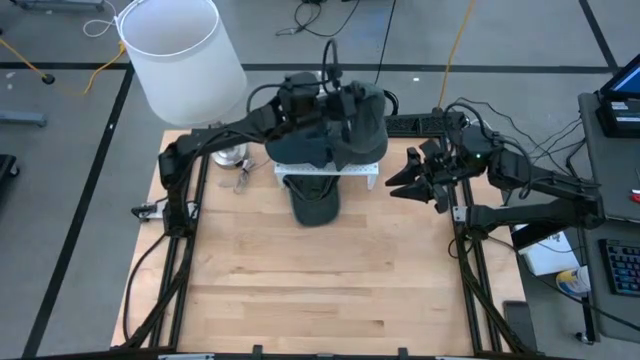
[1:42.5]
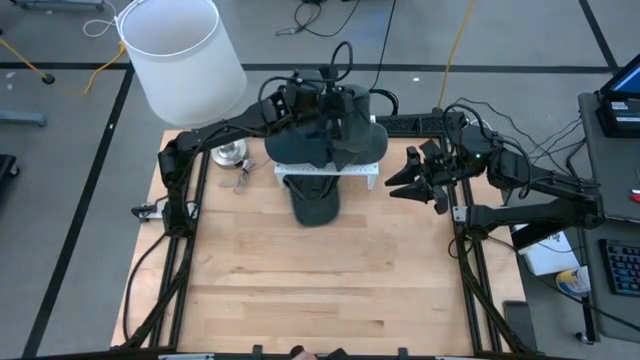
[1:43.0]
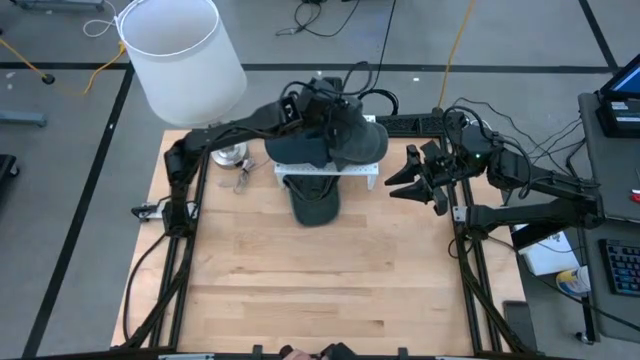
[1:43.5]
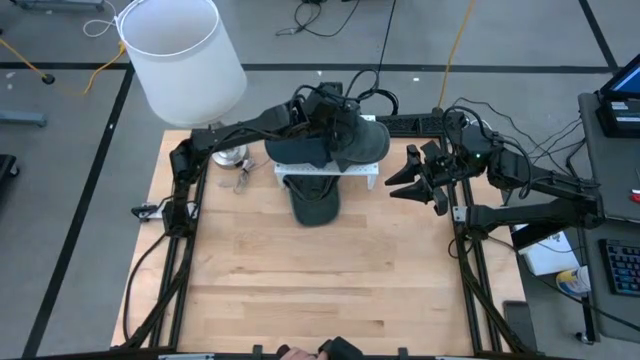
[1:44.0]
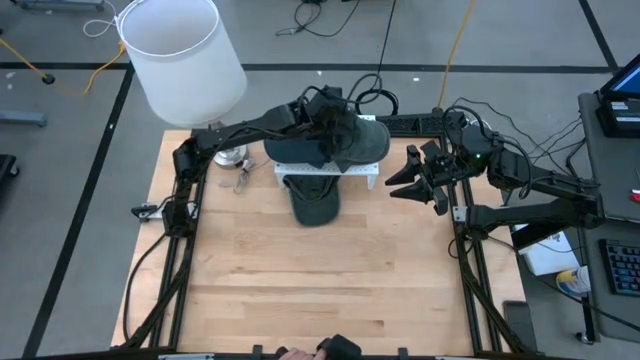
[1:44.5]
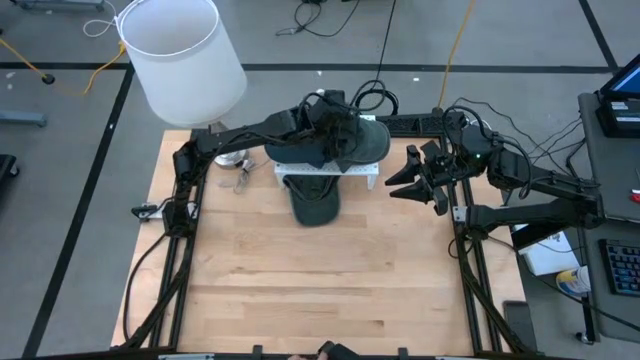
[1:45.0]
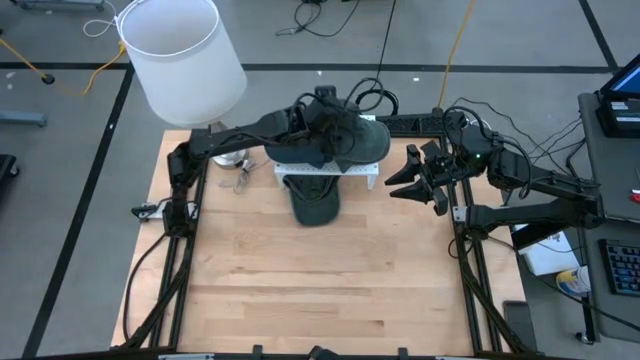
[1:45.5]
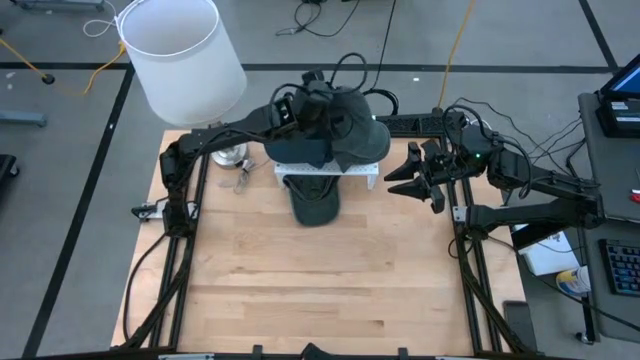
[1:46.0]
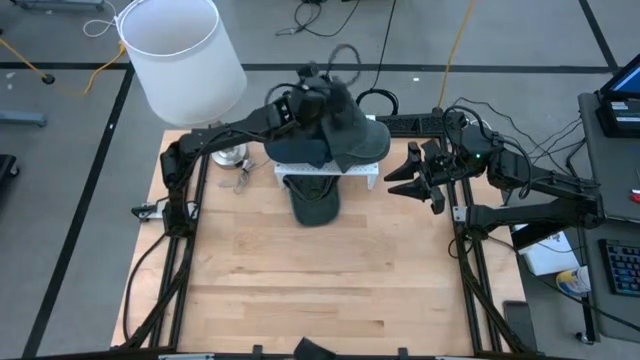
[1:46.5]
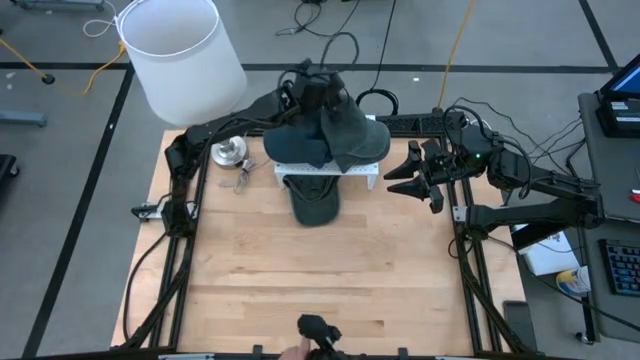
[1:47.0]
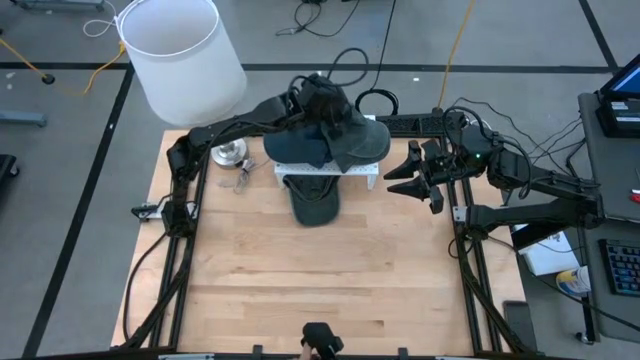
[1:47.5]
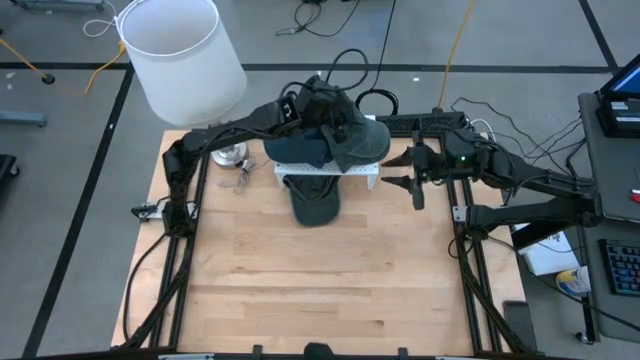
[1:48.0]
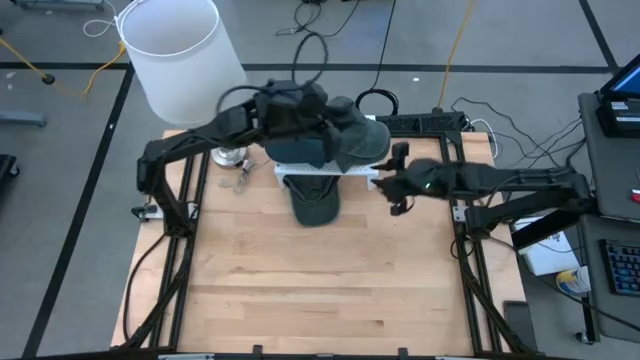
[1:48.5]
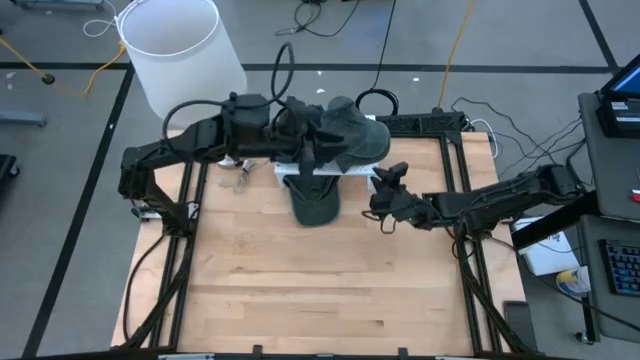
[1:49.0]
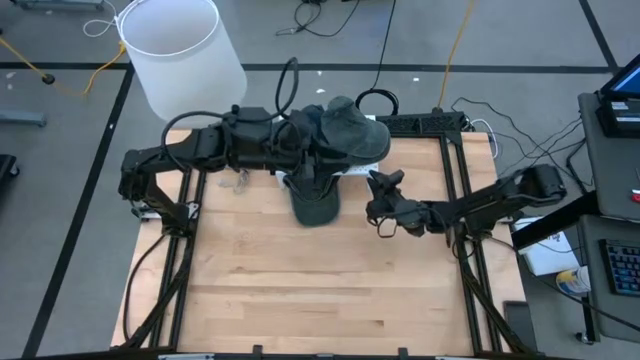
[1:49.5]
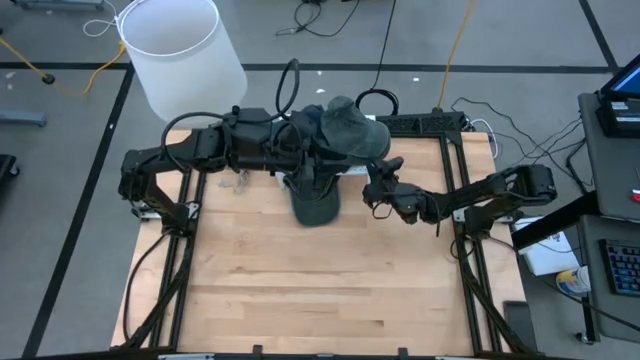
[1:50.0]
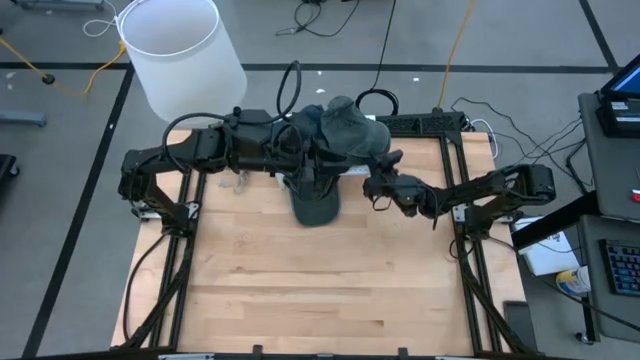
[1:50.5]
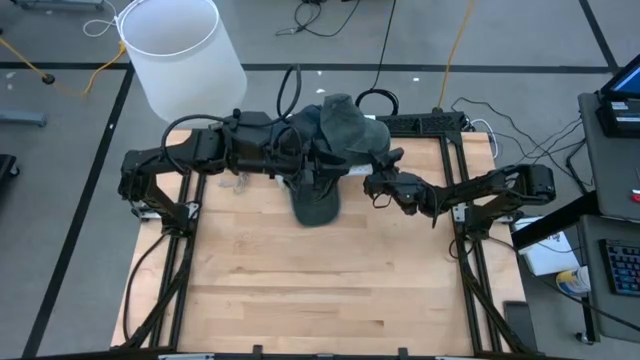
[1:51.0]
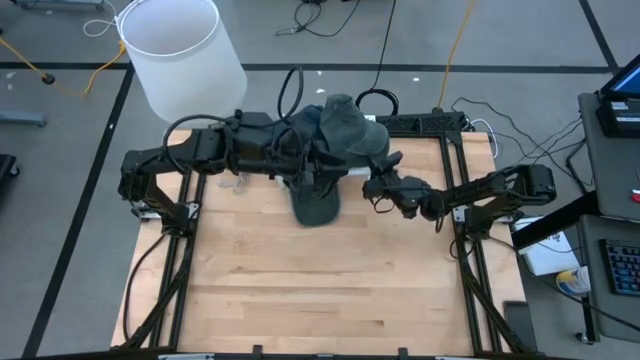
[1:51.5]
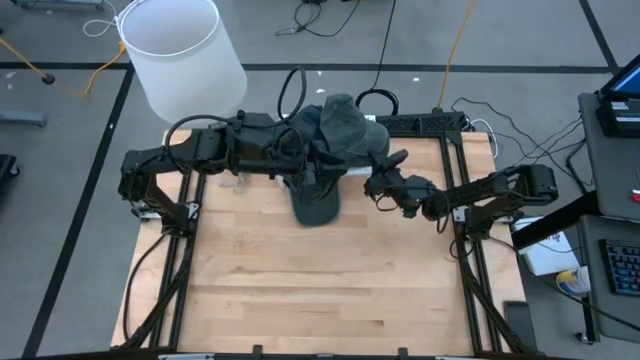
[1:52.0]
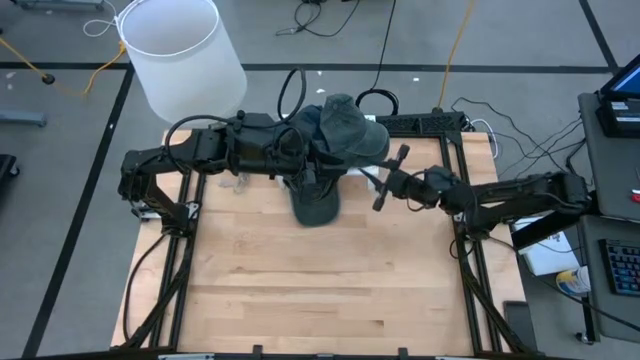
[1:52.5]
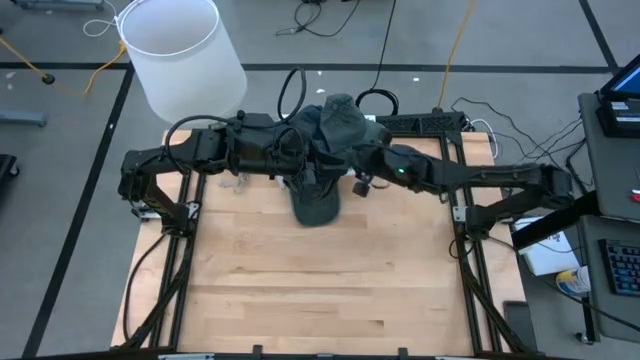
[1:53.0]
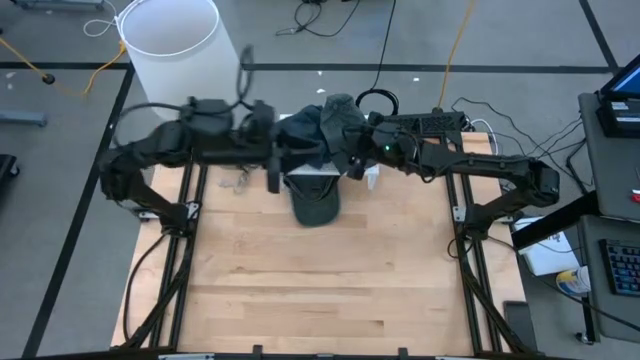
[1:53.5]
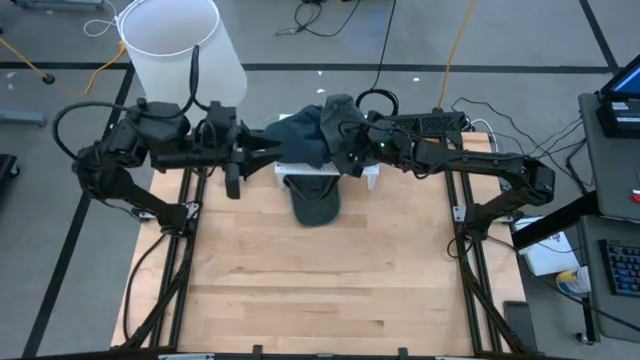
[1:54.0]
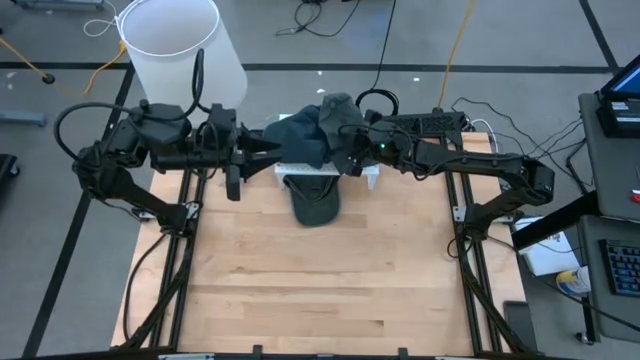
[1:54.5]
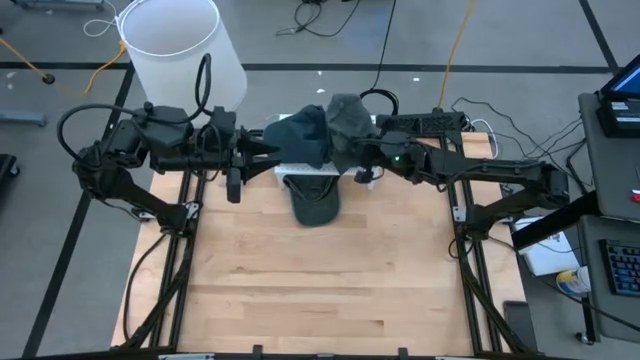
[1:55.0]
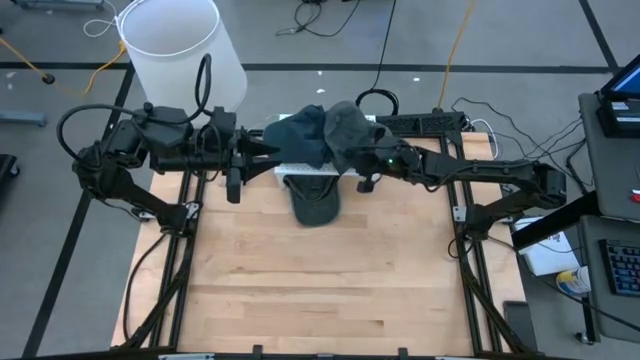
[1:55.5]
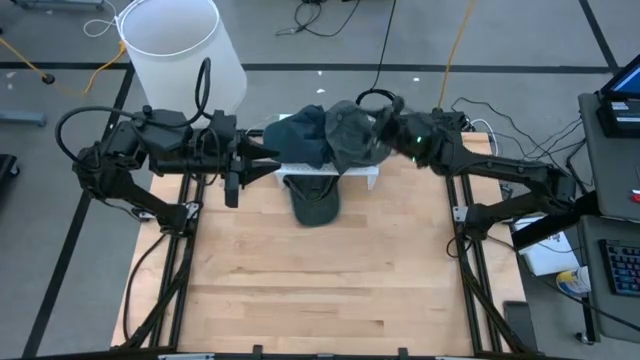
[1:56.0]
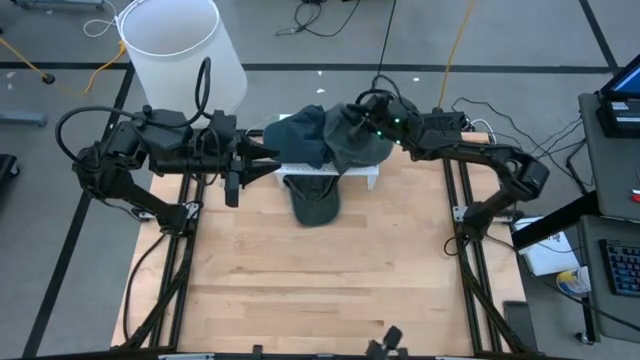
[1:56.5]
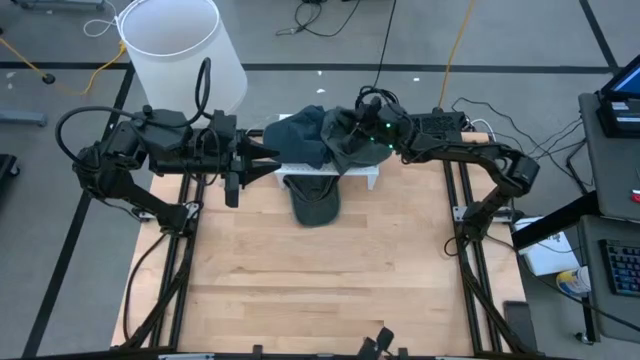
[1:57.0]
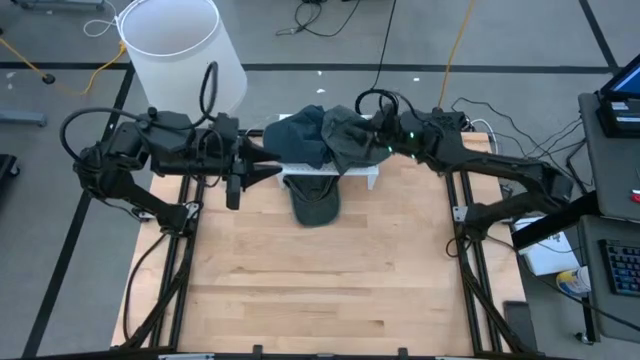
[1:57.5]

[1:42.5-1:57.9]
Task: Pick & Place hat
Stack the right black cap on the black cap on the shelf

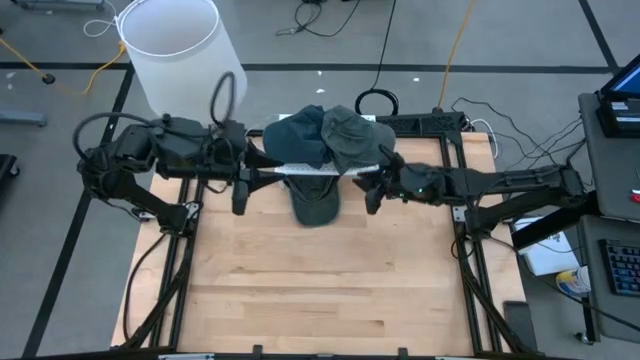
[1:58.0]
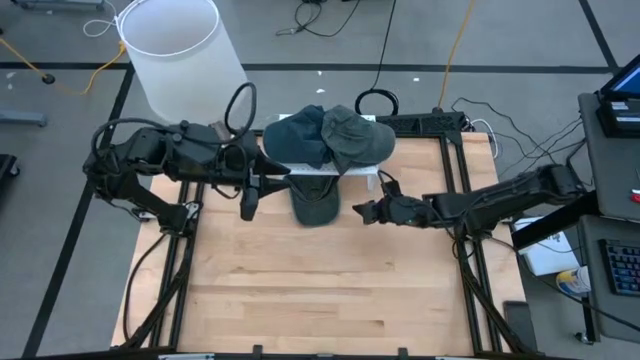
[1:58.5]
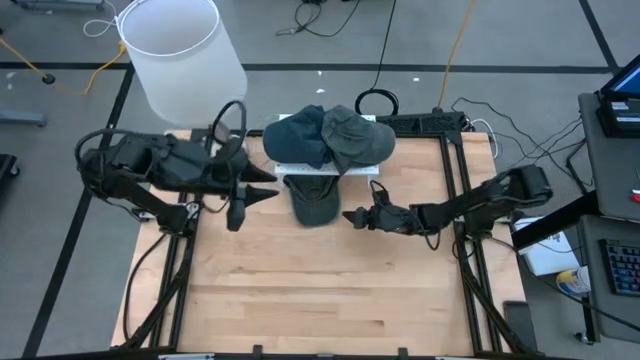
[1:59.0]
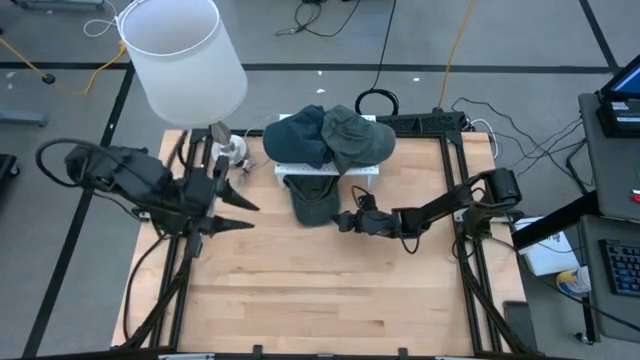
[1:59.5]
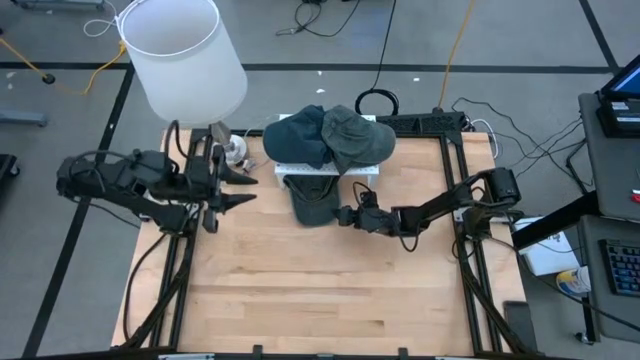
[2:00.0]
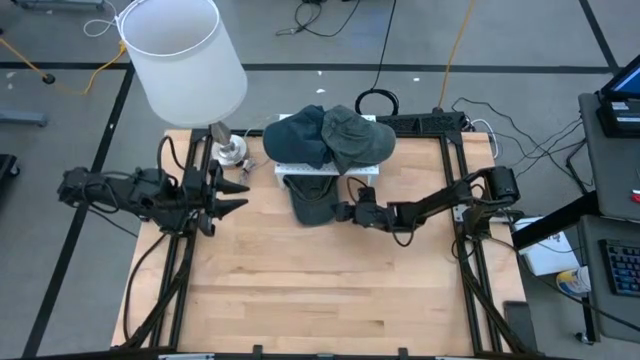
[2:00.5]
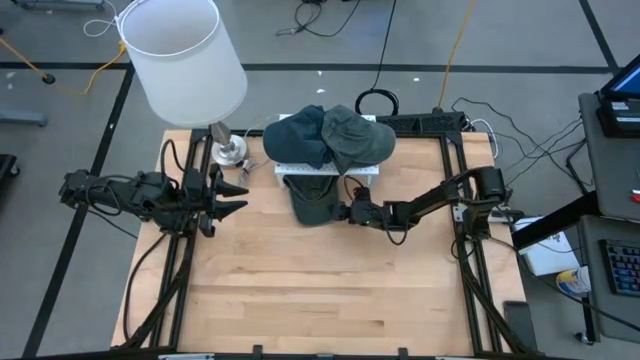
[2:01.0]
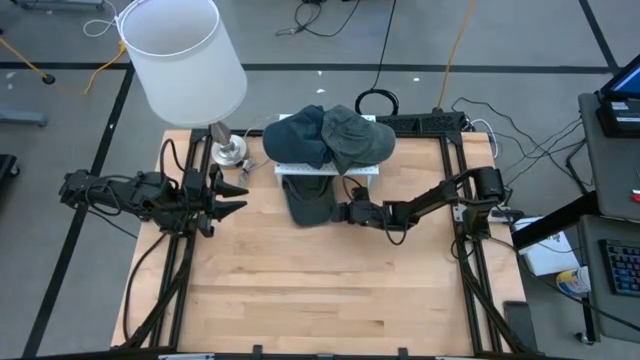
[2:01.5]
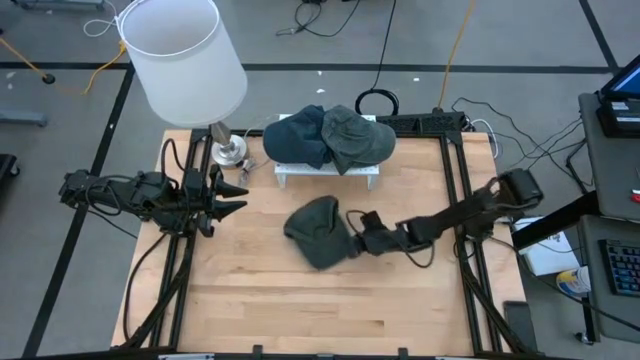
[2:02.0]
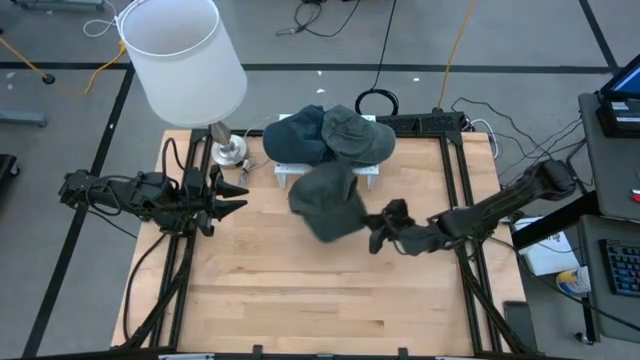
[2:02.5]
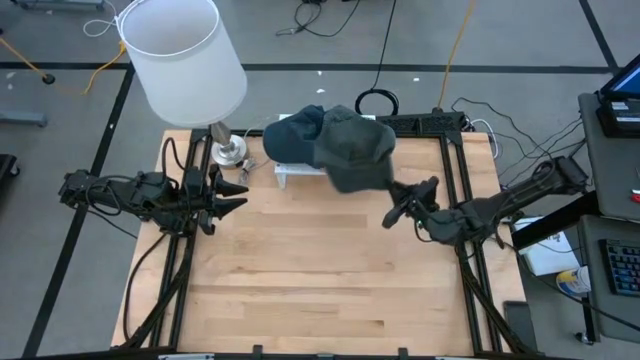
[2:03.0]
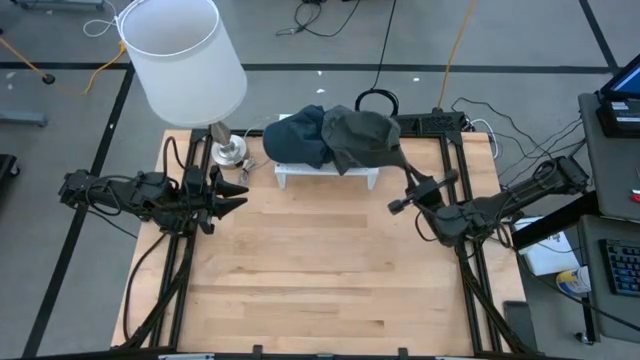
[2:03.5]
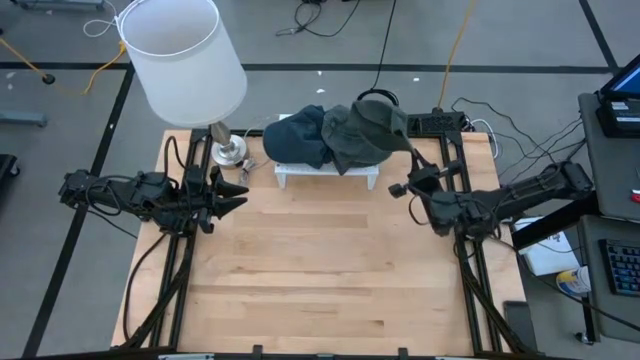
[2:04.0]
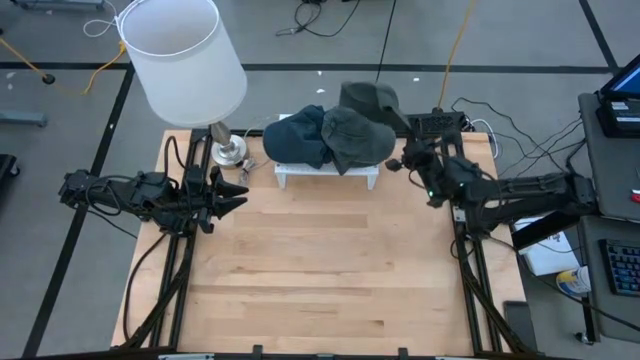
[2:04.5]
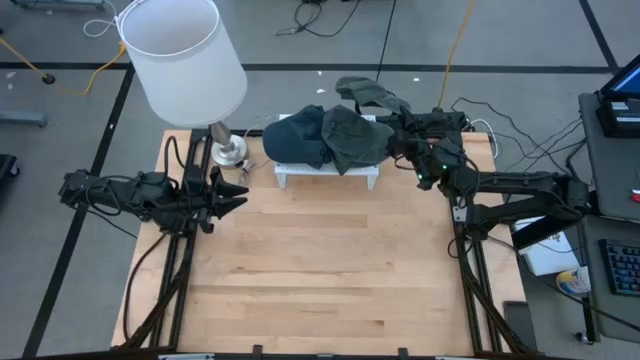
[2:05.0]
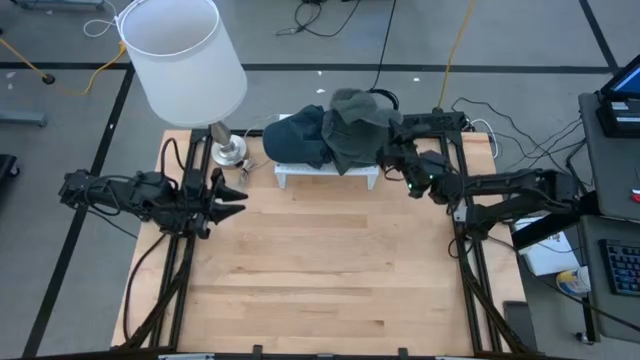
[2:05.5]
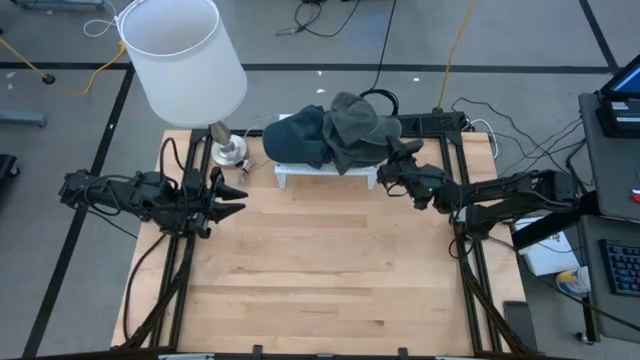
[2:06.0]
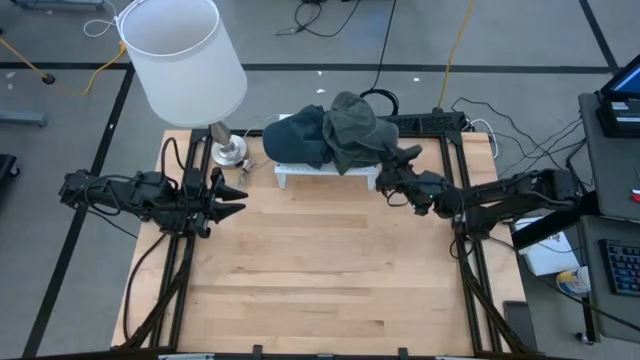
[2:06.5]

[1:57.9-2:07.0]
Stack the black cap on the black caps on the shelf
